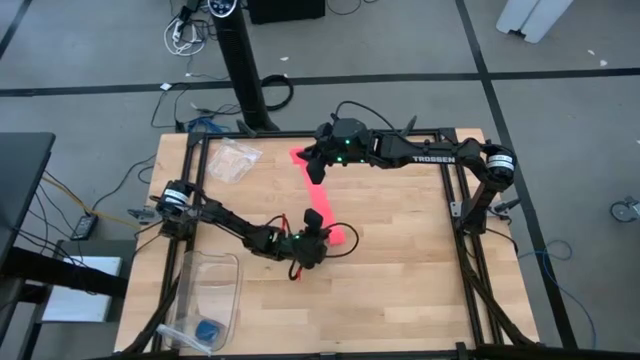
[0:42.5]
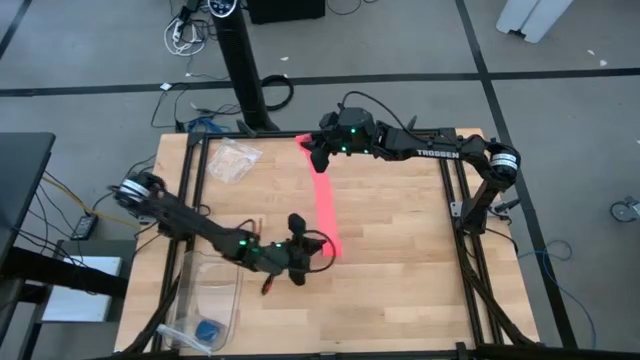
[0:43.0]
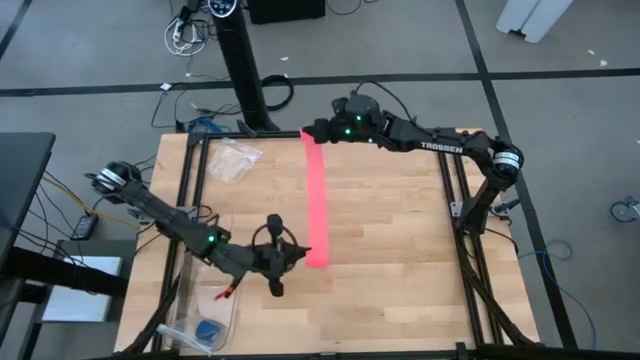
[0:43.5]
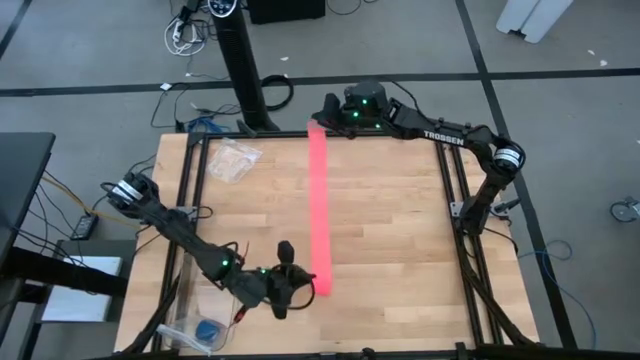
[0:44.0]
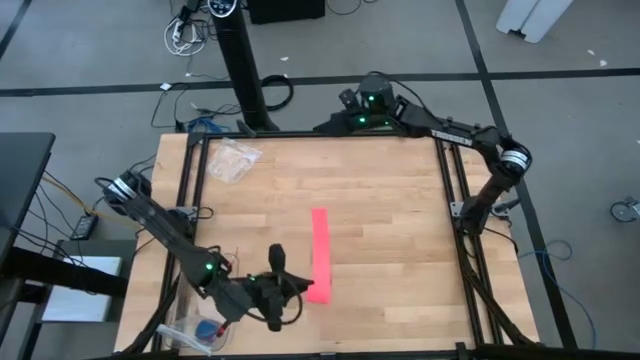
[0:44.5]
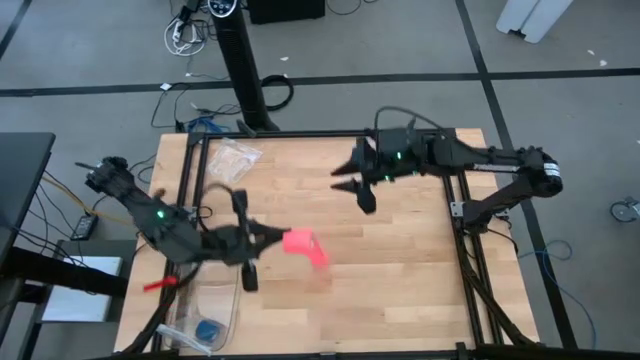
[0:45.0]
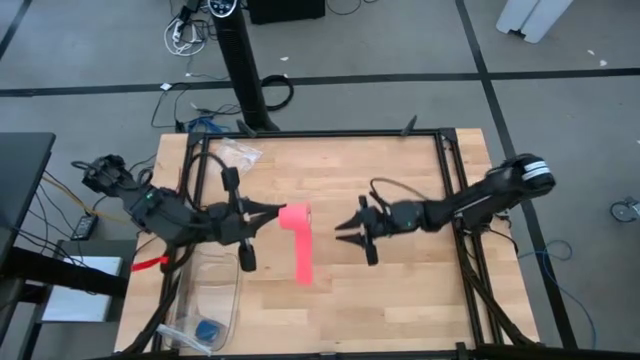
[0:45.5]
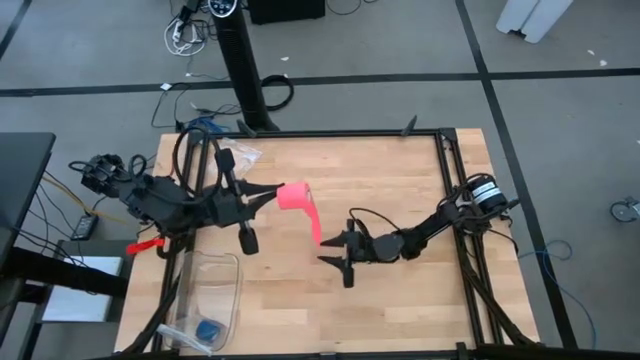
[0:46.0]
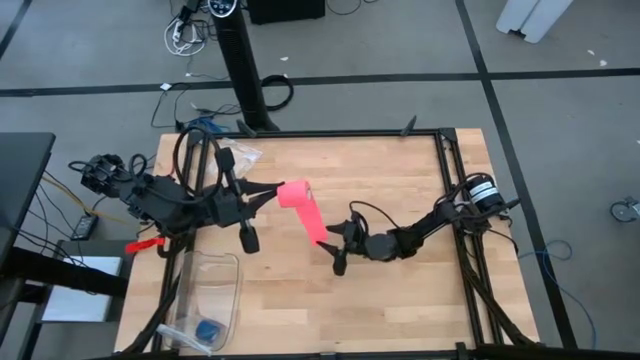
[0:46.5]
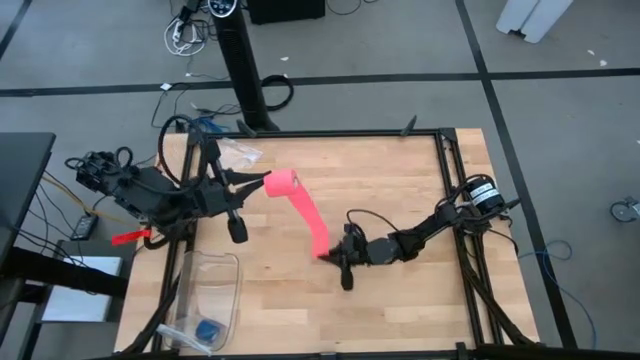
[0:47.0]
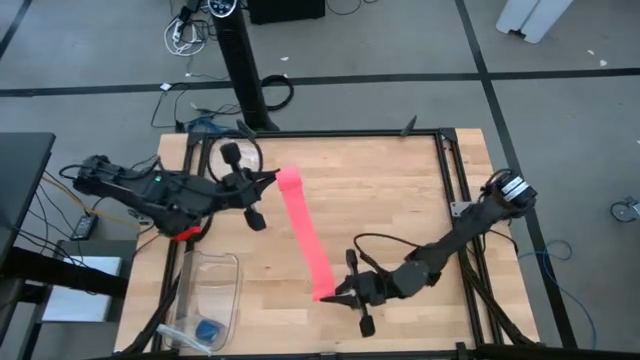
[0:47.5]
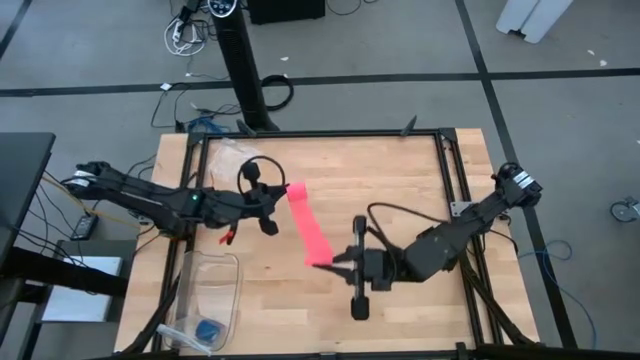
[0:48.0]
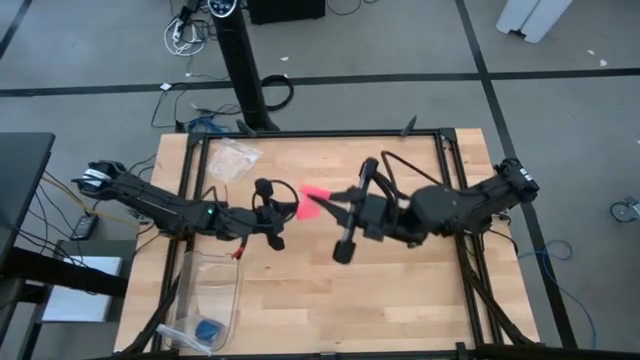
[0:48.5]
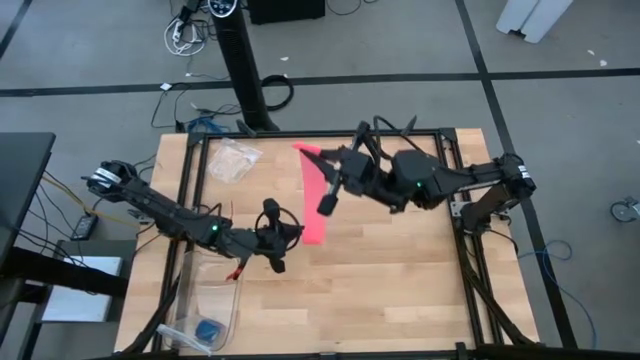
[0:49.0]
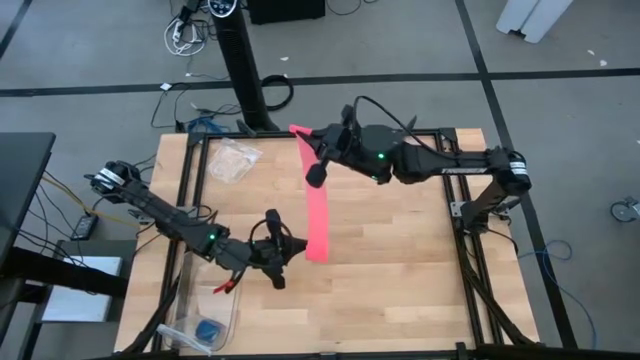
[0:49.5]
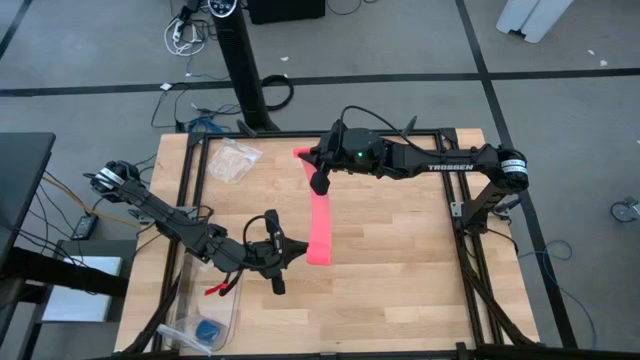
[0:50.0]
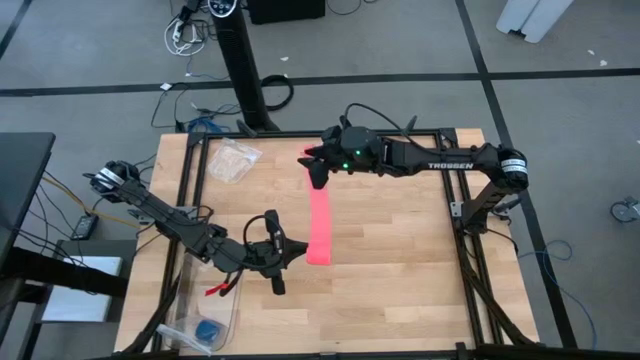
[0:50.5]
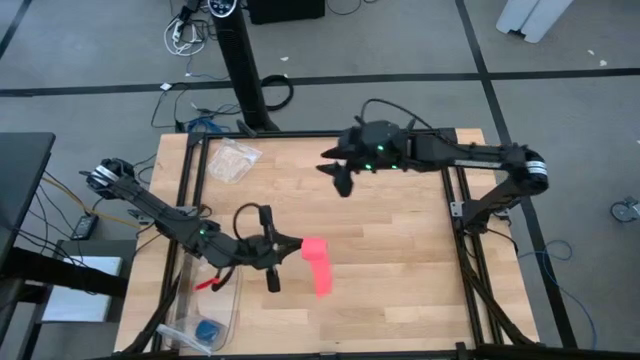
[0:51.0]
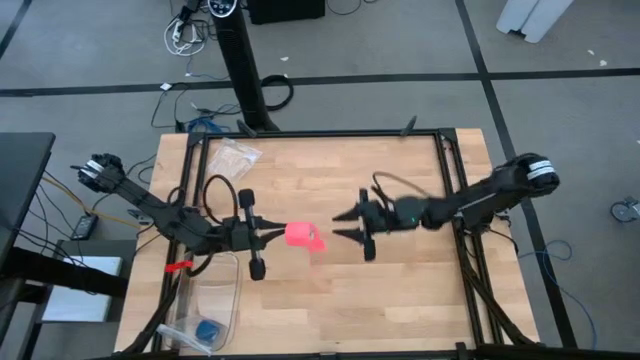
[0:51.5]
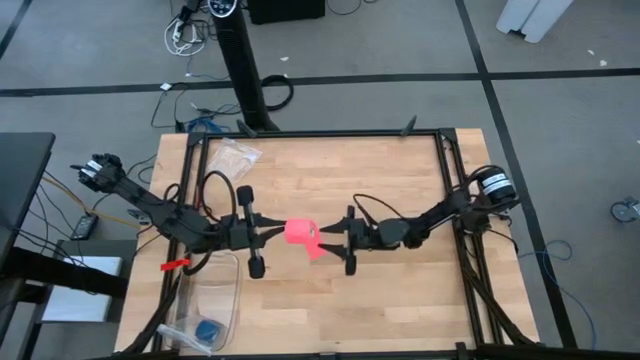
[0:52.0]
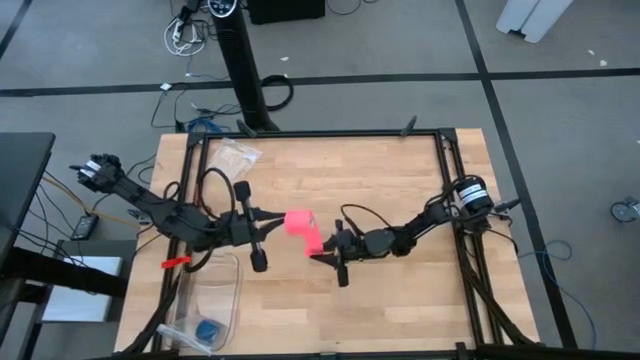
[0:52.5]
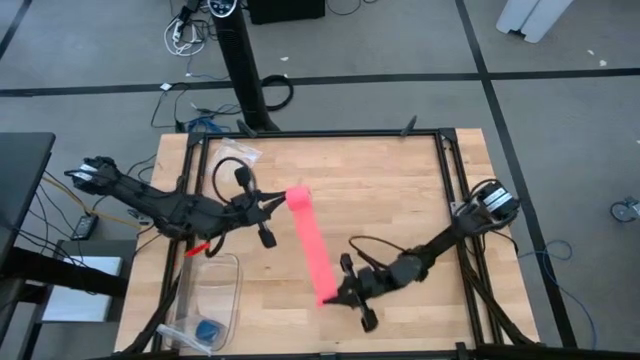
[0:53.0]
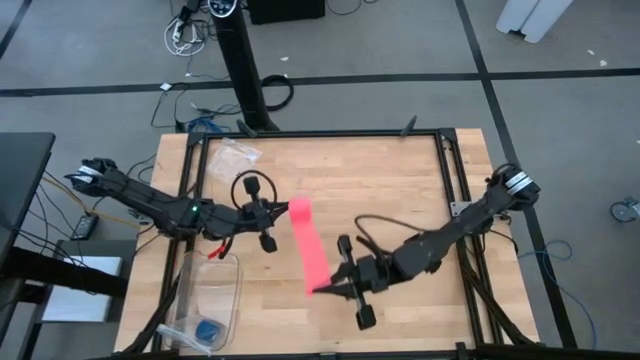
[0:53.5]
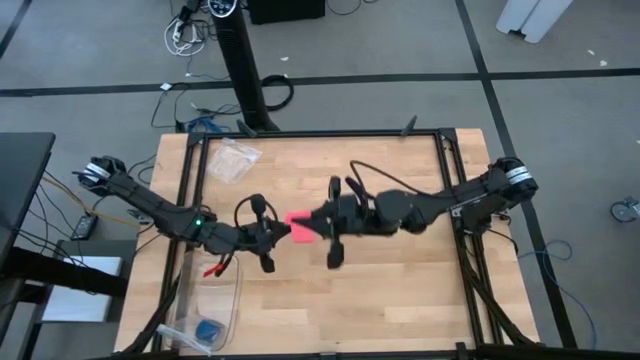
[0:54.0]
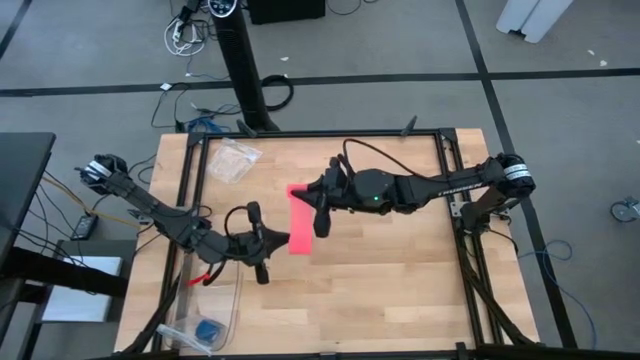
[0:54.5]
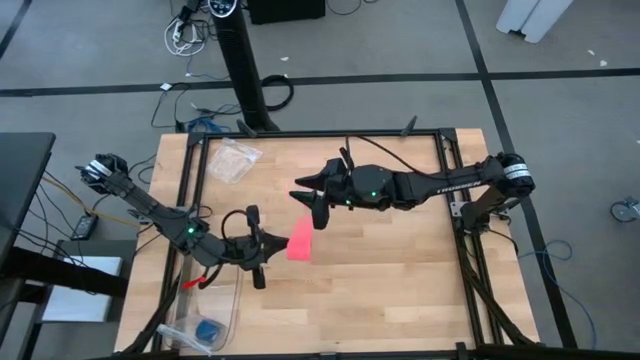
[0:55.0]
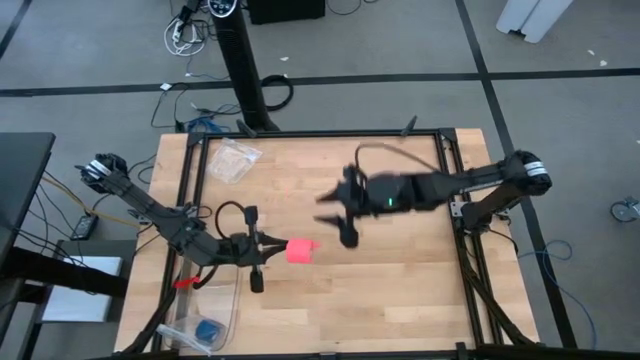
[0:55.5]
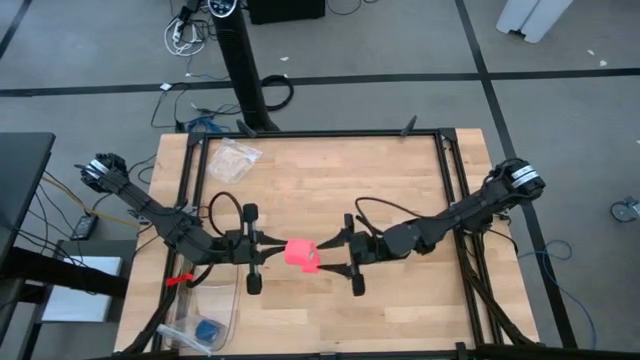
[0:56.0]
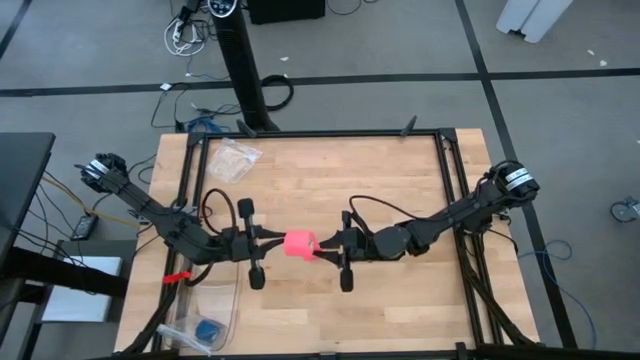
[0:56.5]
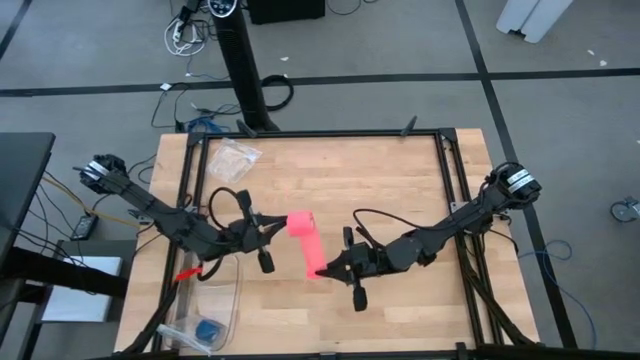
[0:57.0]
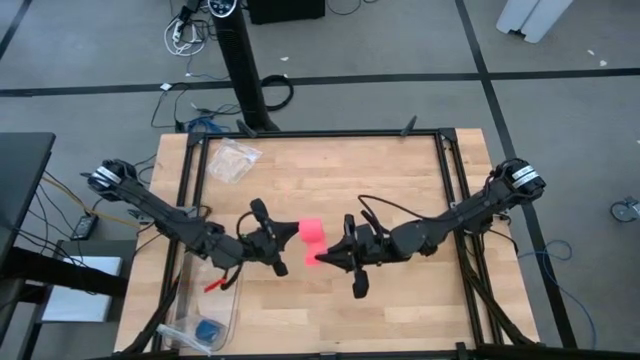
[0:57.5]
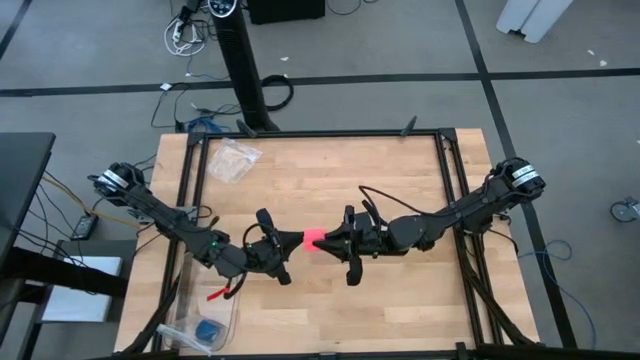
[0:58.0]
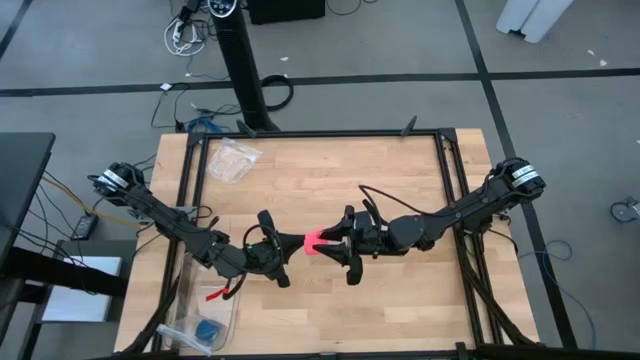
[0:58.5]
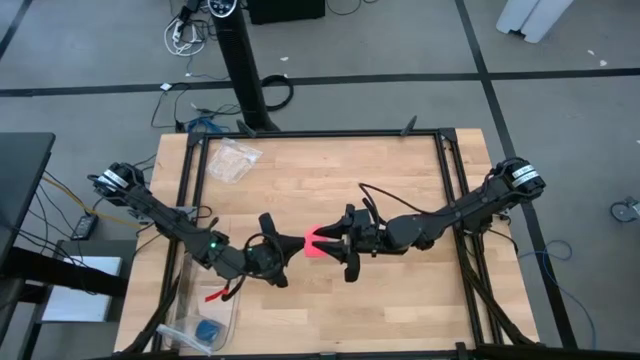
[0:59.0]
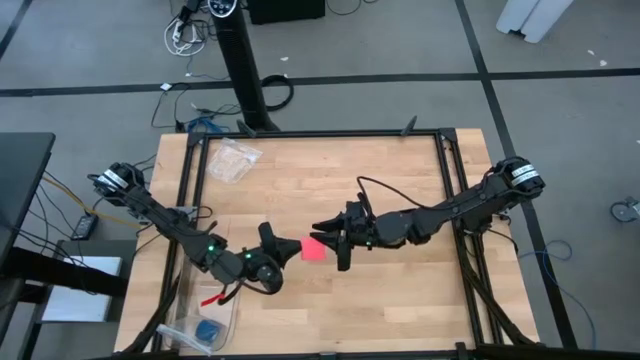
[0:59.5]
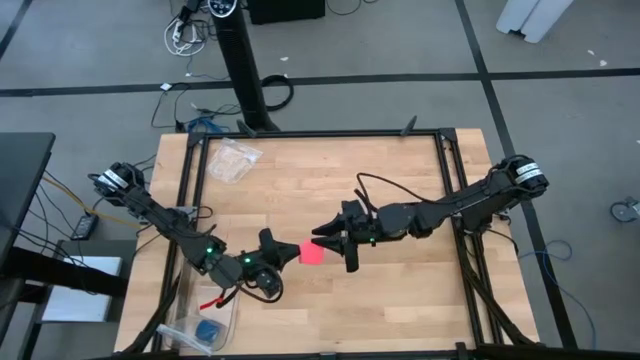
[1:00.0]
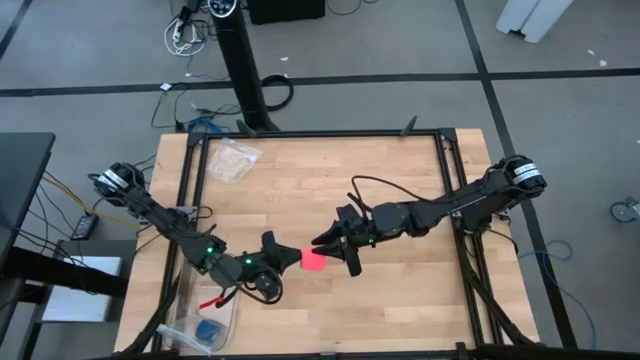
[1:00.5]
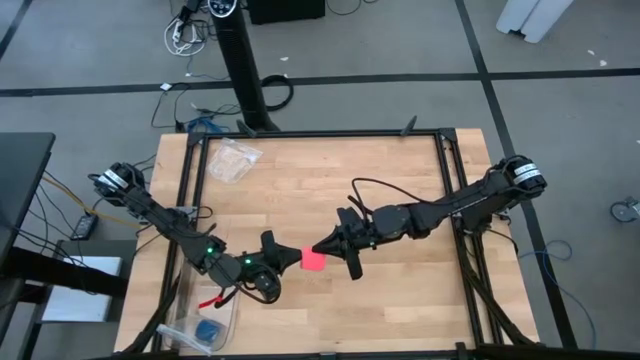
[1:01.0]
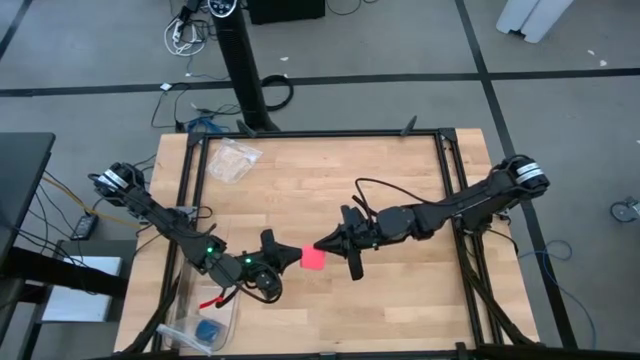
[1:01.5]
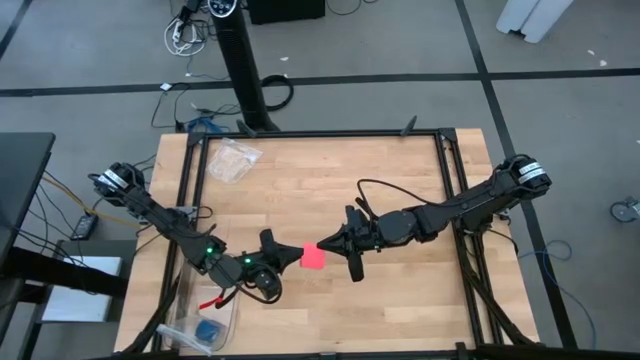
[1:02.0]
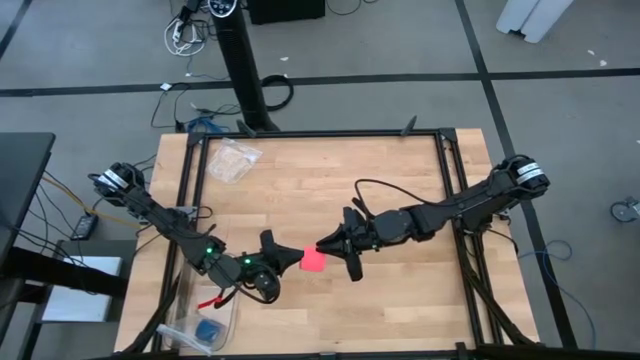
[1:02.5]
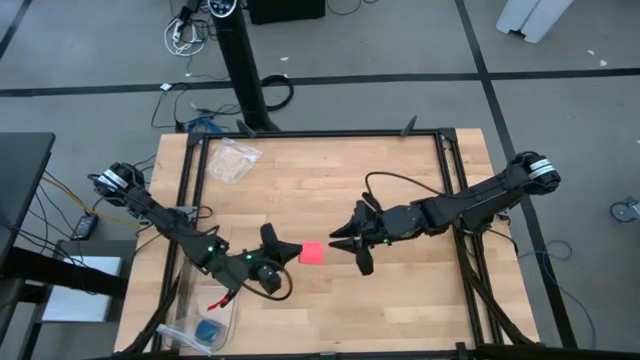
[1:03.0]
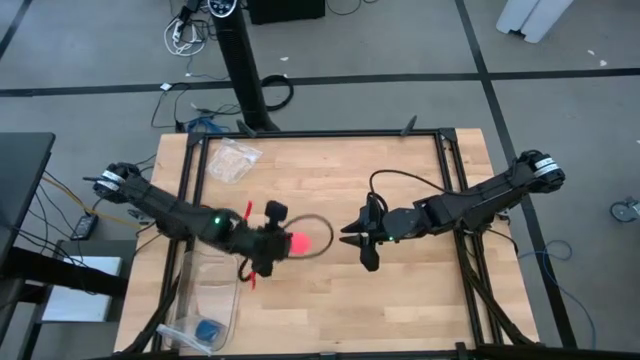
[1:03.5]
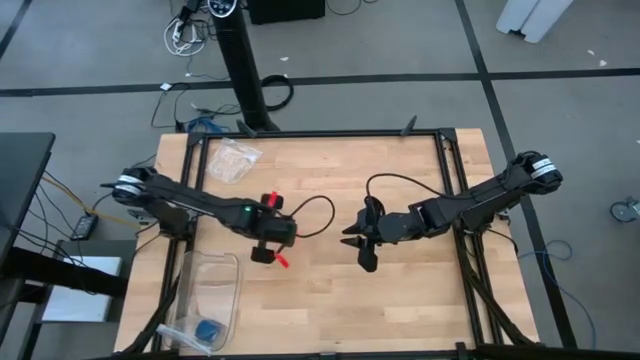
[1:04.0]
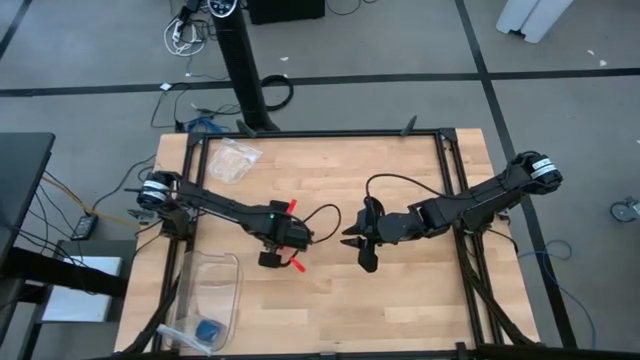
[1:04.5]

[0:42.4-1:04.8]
Task: Roll bandage
Roll the pink bandage
